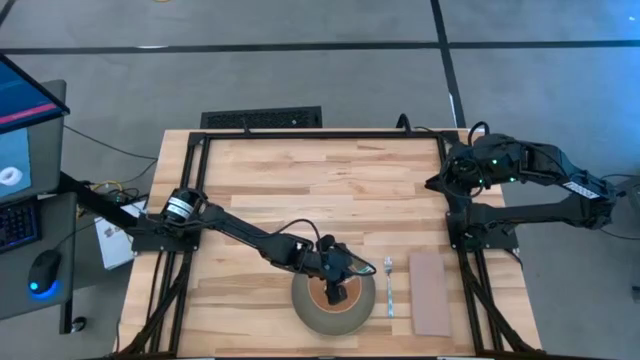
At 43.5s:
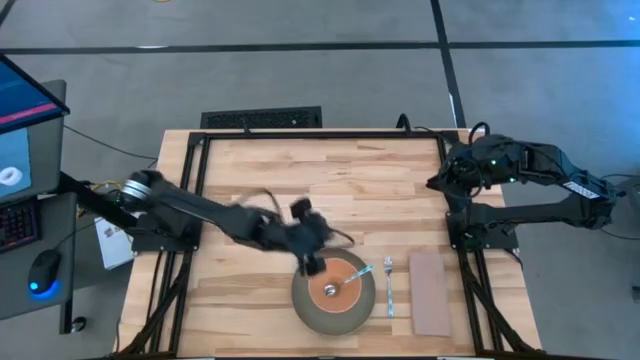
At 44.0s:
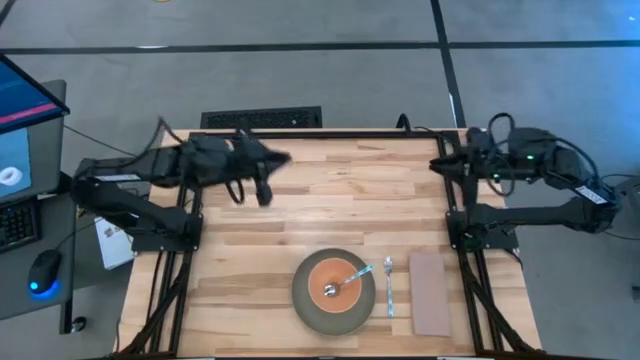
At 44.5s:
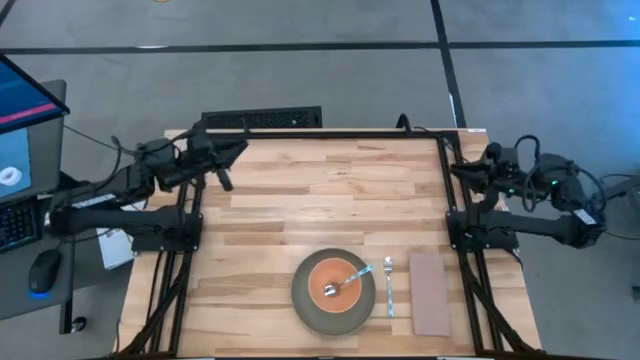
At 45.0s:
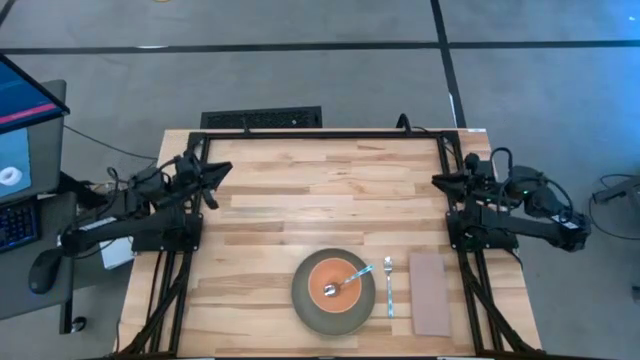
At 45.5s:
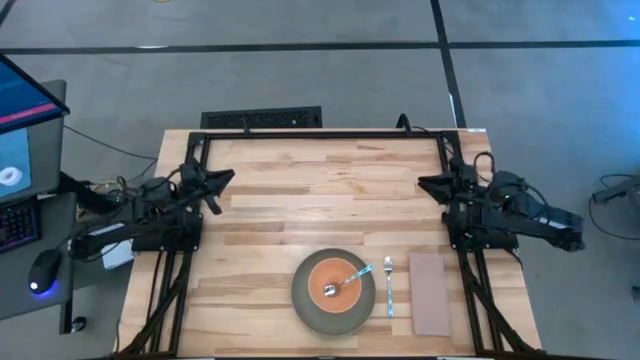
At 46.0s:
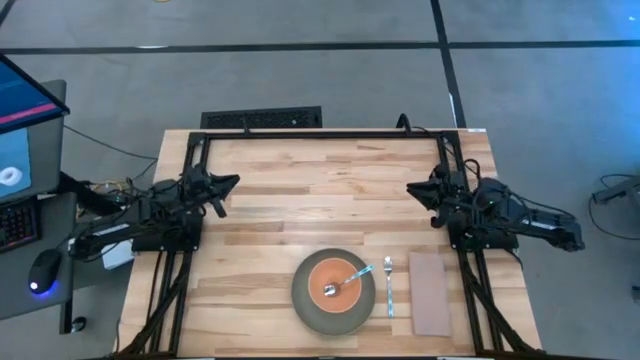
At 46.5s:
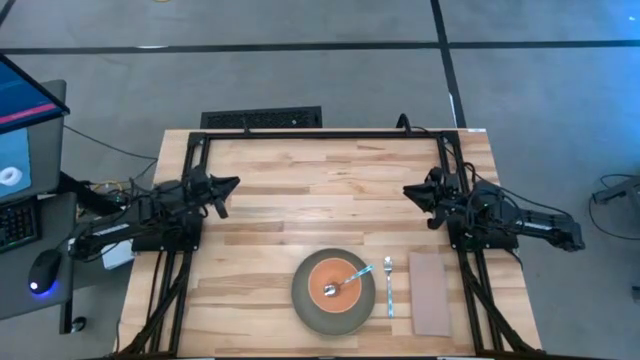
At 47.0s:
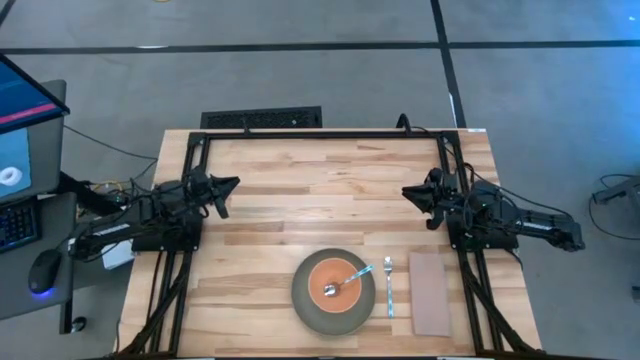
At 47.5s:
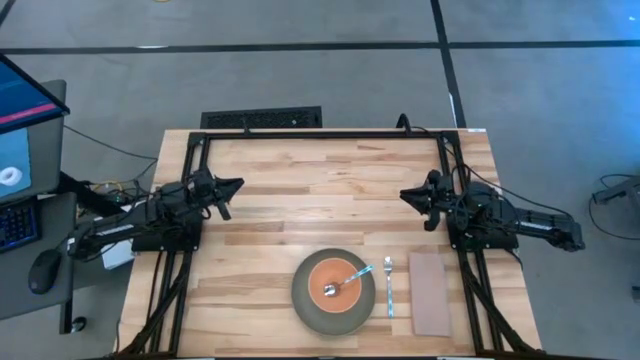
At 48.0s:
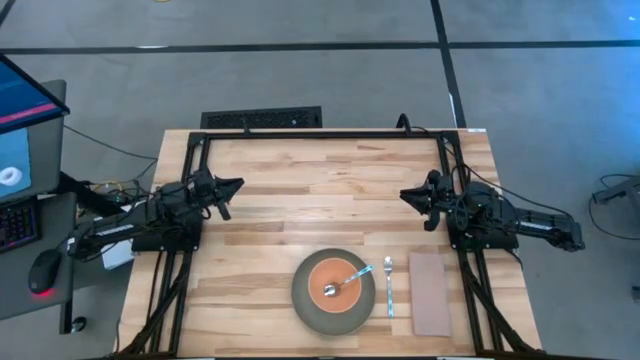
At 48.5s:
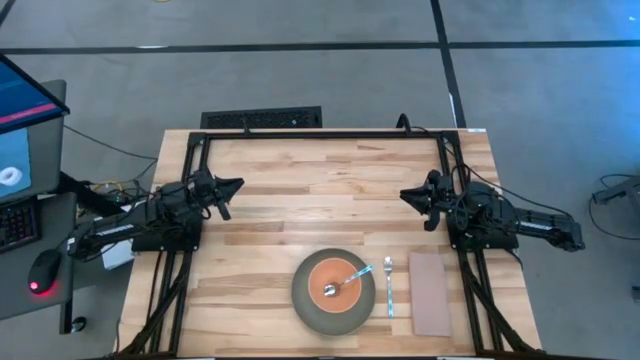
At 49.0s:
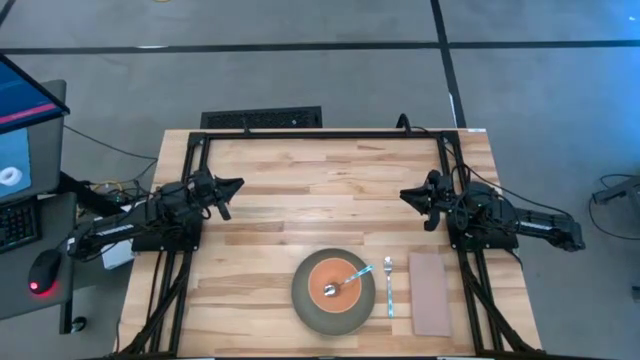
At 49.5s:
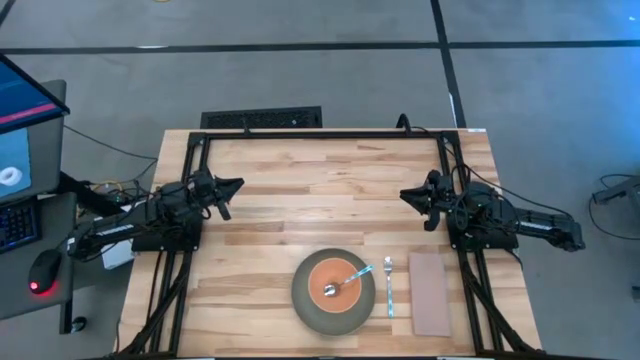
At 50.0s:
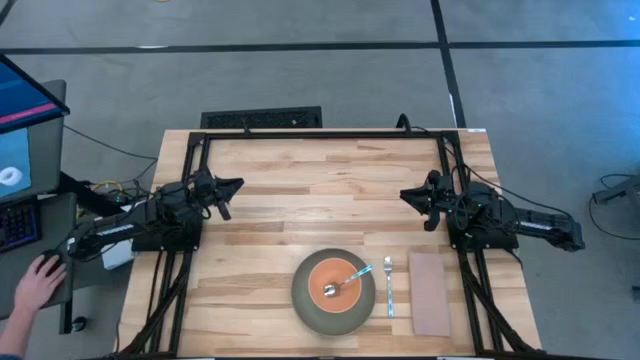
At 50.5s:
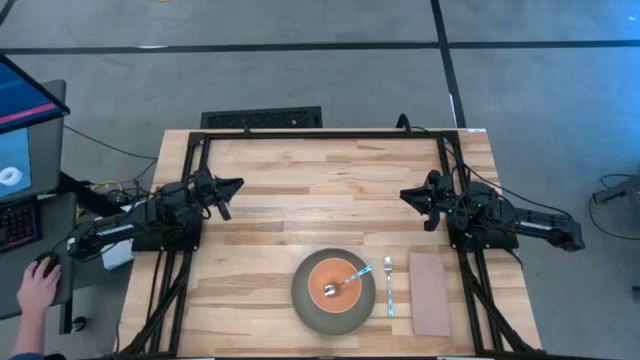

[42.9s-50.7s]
Task: Set table place
Return to Home Position

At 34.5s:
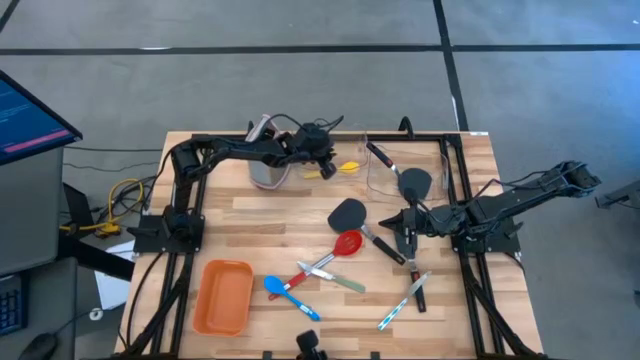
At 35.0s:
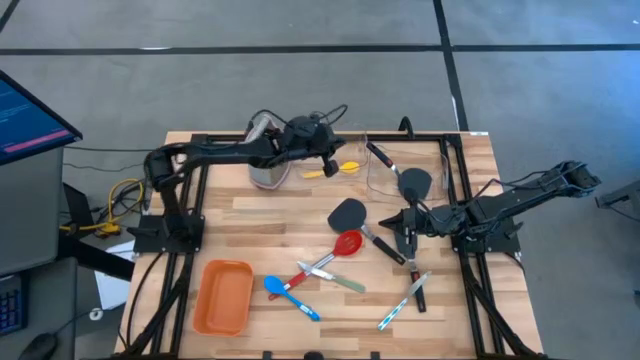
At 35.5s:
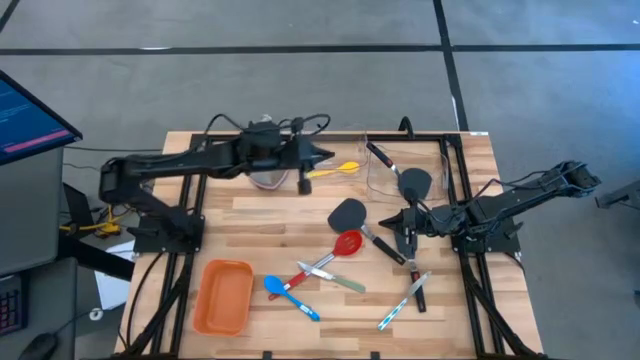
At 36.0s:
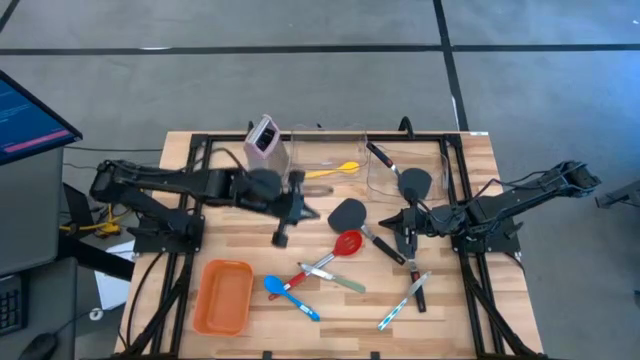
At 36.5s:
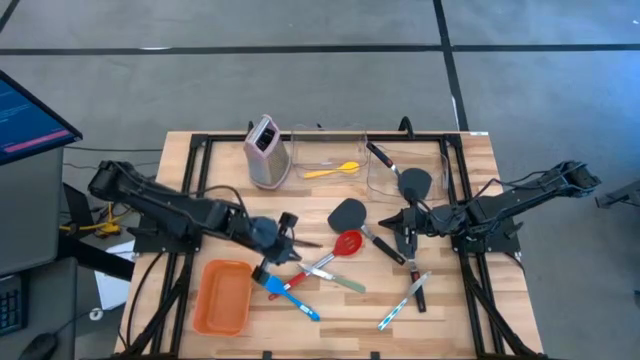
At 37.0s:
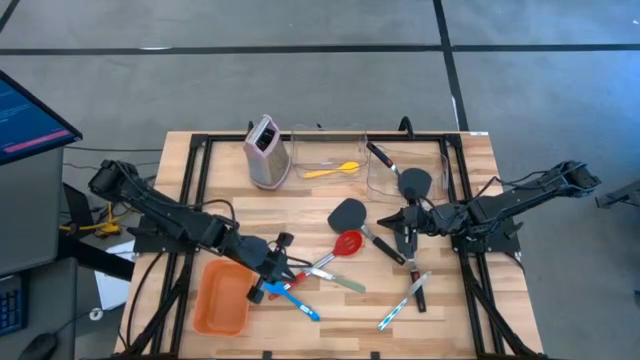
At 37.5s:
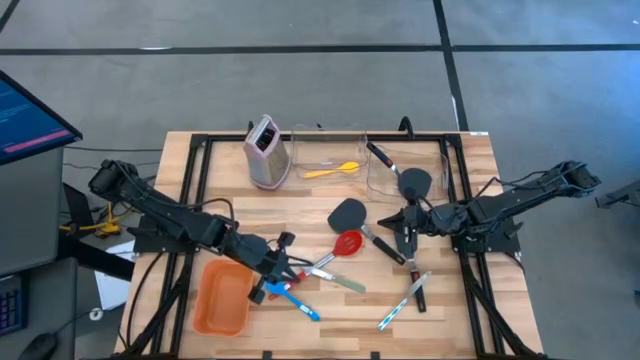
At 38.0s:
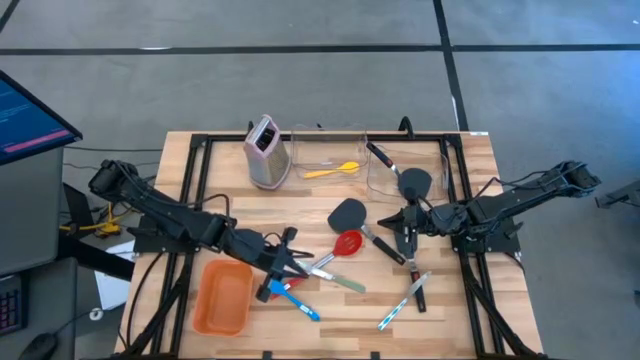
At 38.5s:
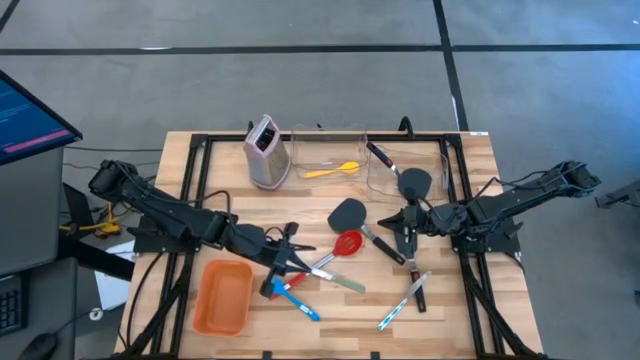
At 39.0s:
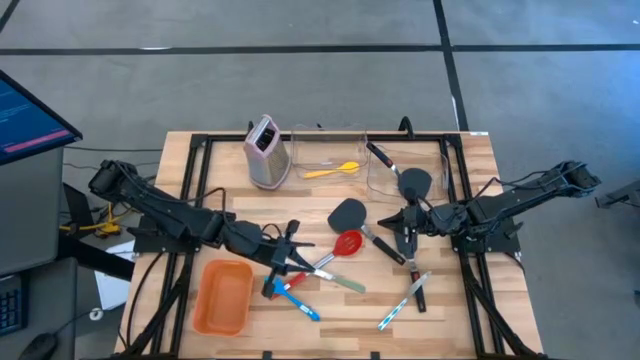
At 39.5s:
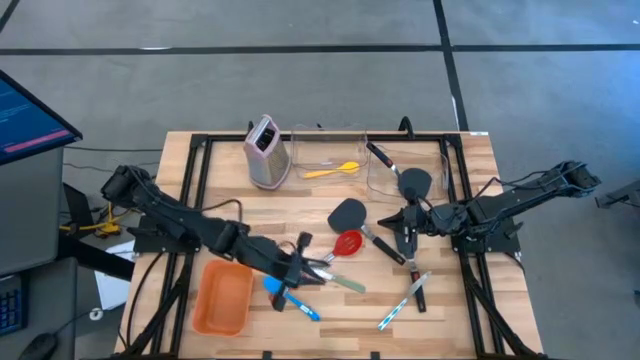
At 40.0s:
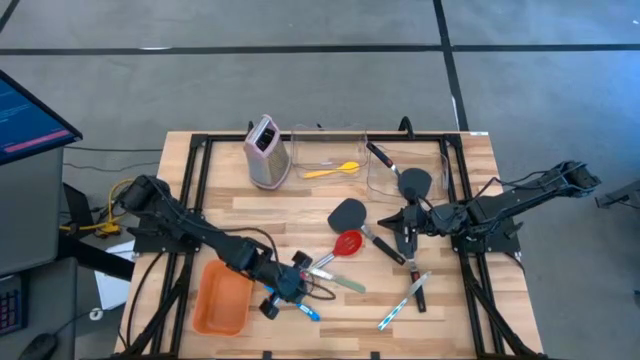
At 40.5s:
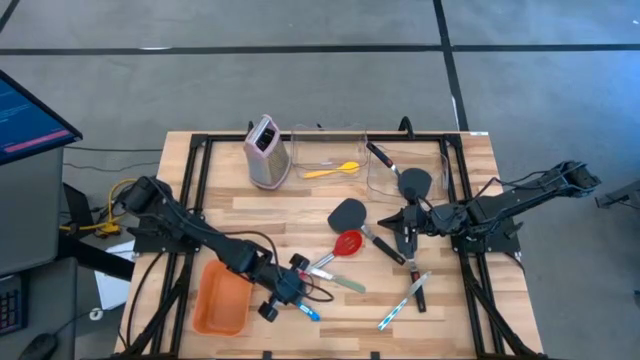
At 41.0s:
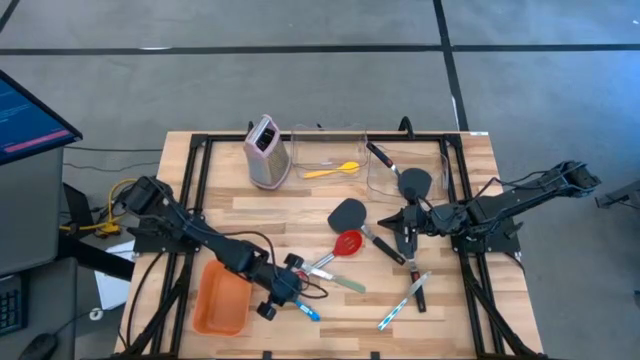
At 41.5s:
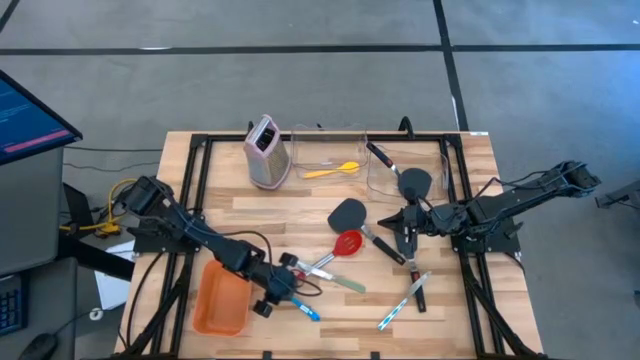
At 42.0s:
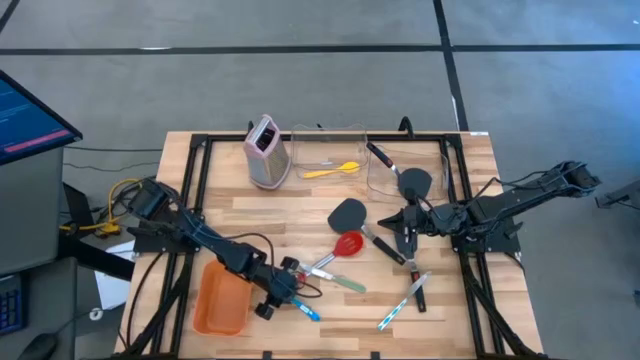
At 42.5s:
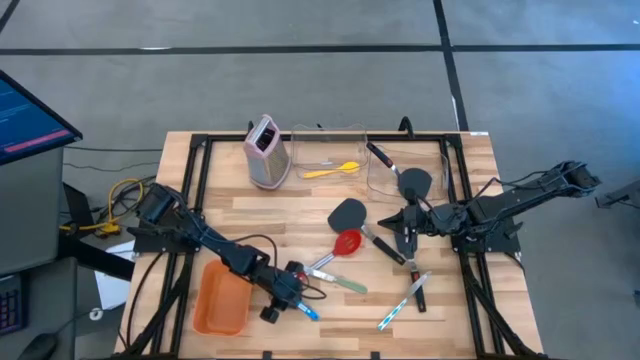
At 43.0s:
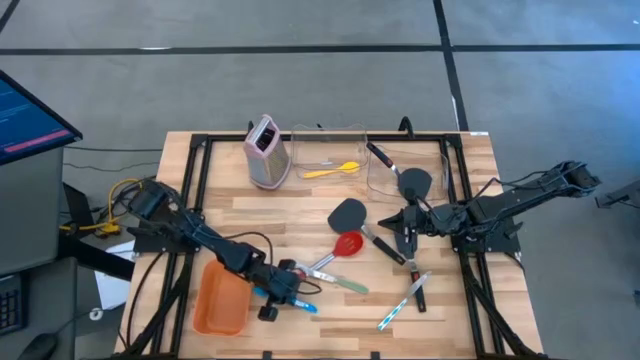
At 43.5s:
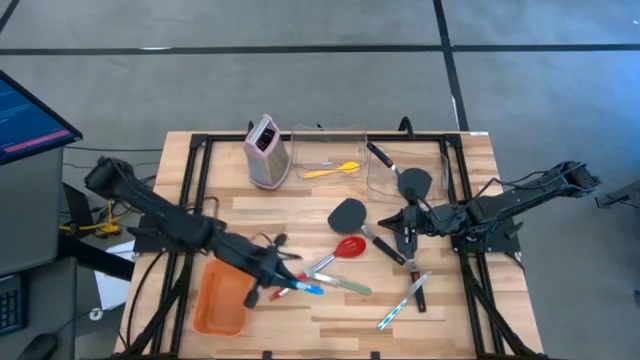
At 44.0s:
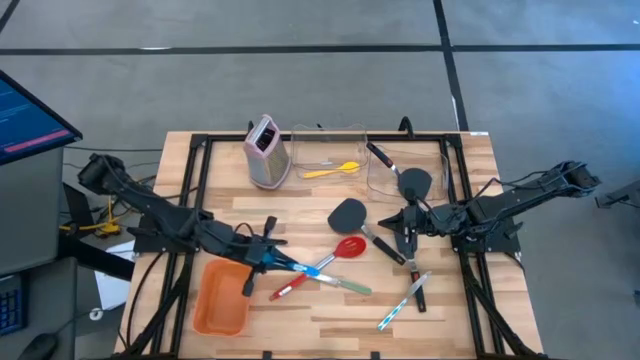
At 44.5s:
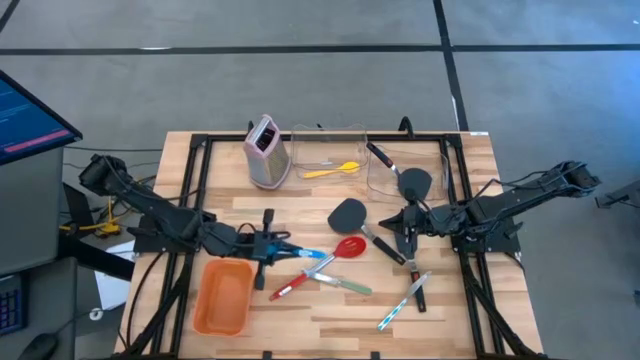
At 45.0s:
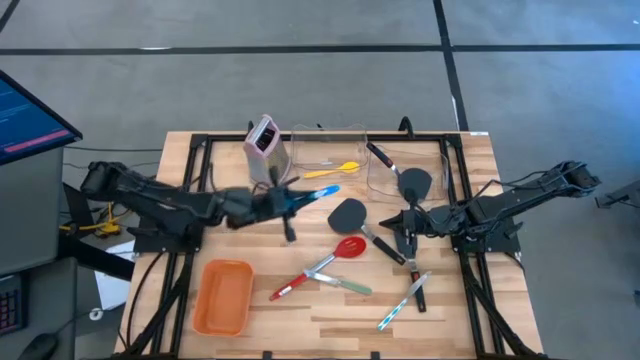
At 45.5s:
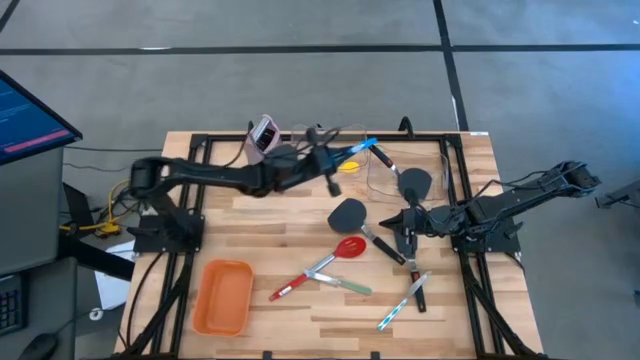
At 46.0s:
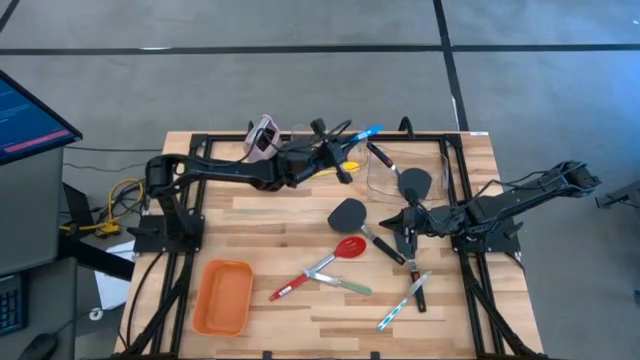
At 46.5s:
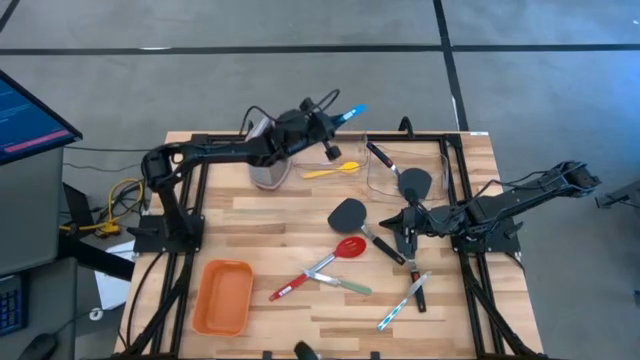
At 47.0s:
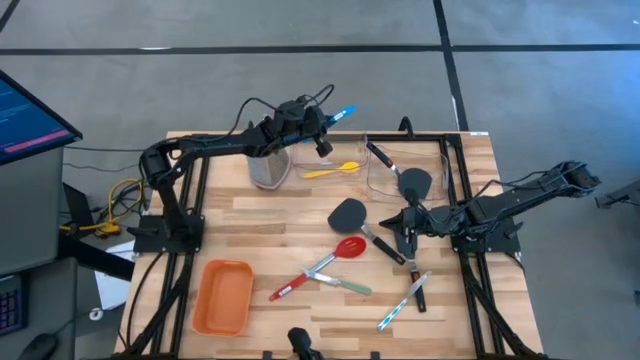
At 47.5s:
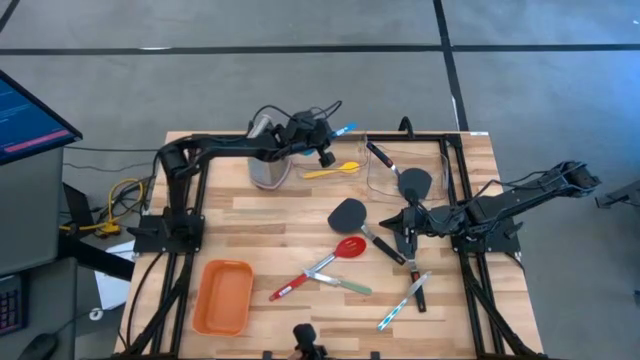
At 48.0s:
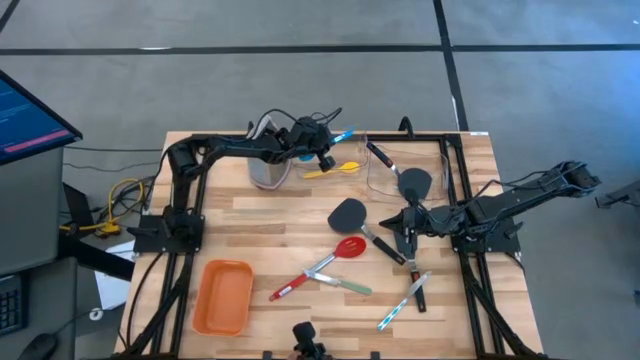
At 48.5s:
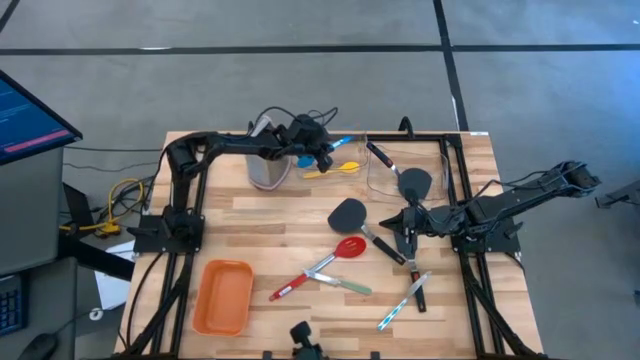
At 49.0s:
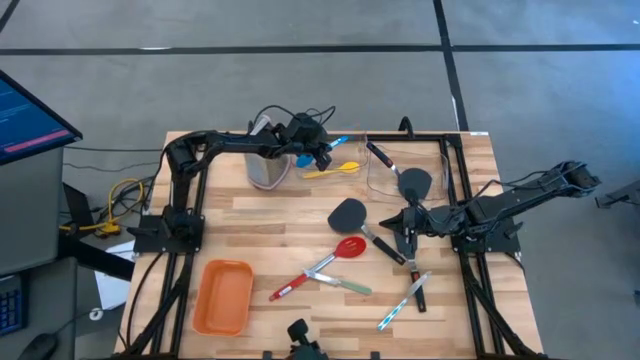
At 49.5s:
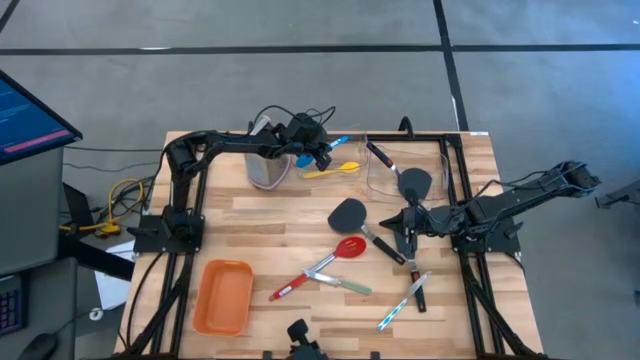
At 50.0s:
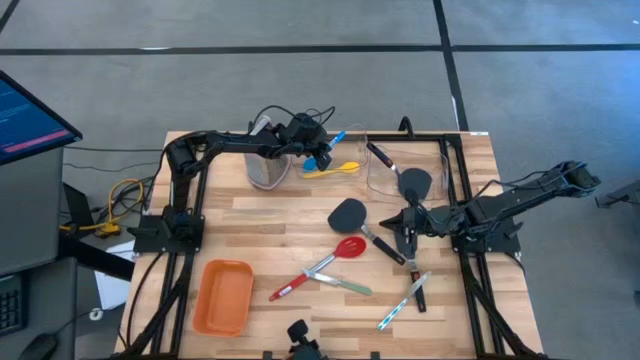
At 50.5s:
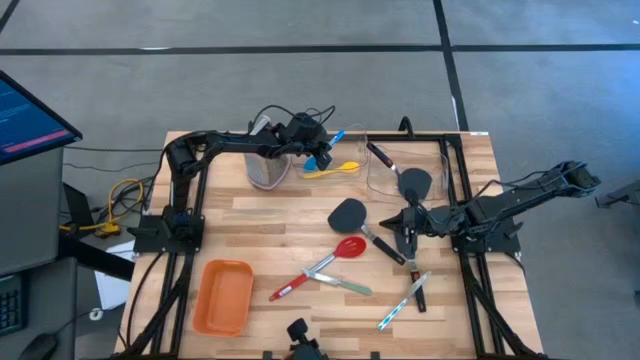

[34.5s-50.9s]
Task: Pick & Place Kitchen Items
Put the blue serving spoon into the left transparent bin
